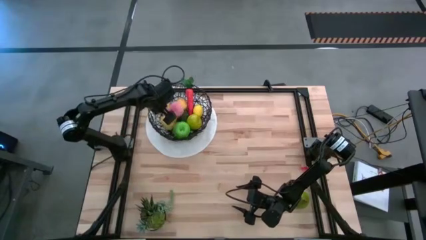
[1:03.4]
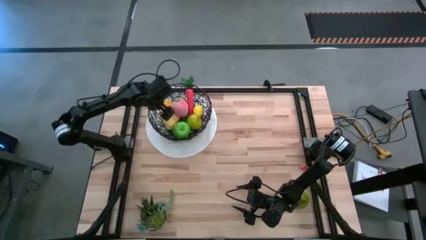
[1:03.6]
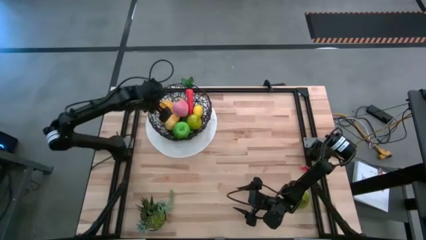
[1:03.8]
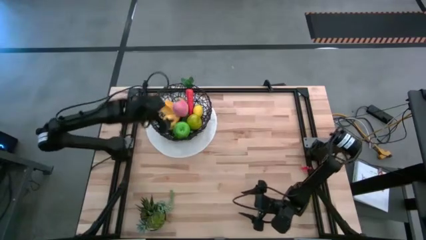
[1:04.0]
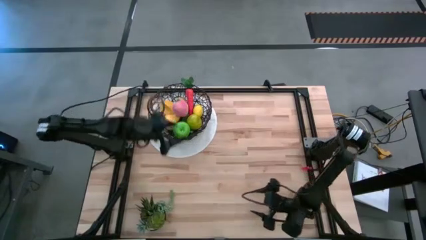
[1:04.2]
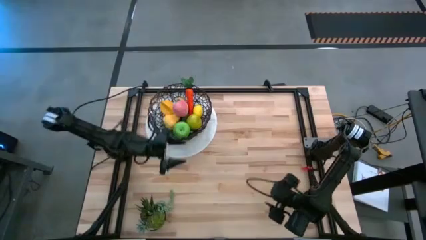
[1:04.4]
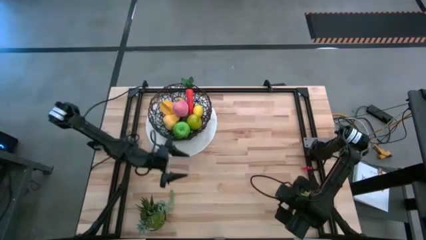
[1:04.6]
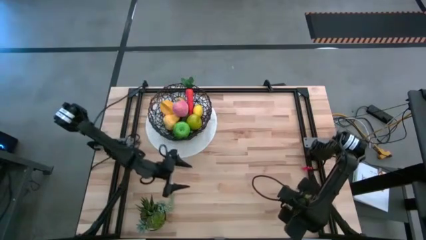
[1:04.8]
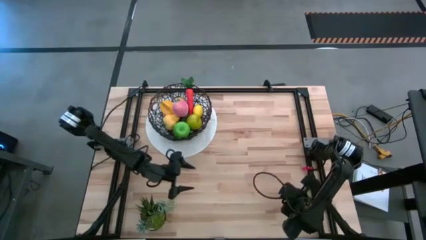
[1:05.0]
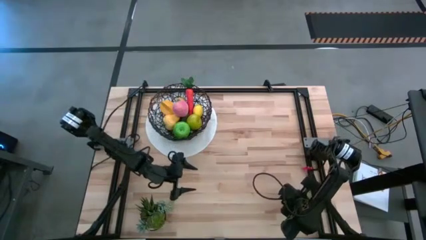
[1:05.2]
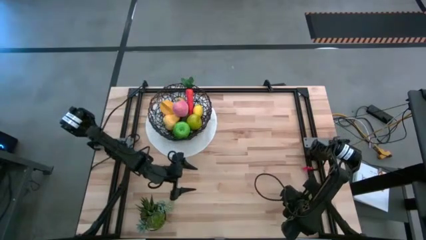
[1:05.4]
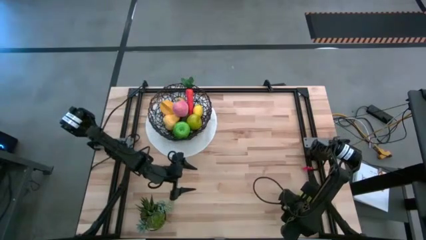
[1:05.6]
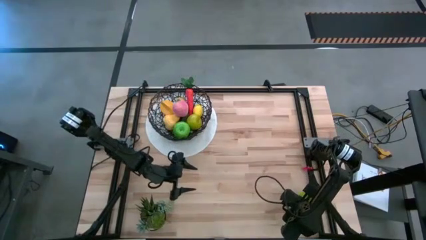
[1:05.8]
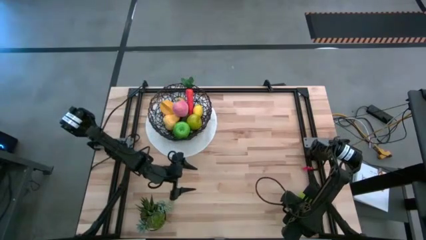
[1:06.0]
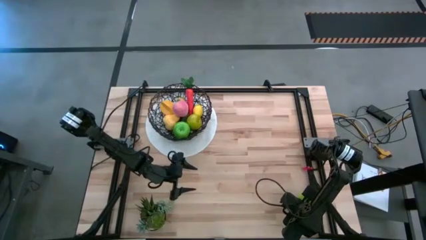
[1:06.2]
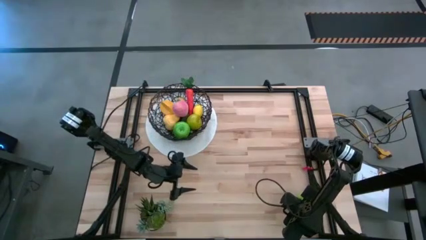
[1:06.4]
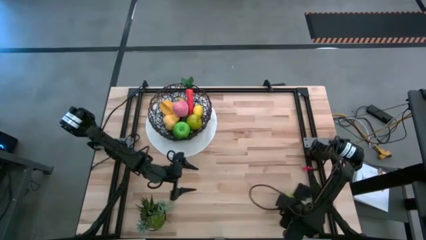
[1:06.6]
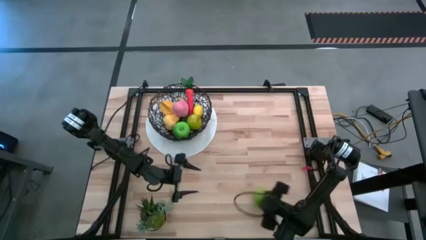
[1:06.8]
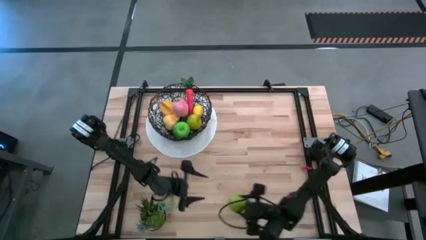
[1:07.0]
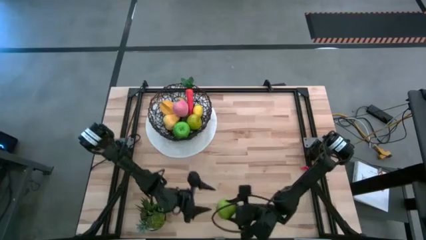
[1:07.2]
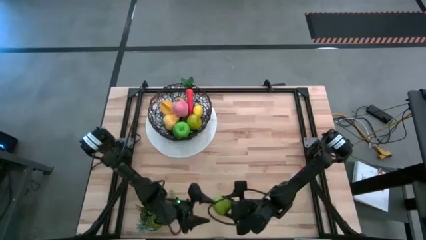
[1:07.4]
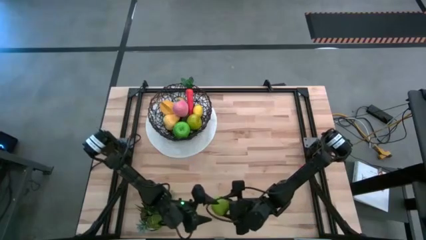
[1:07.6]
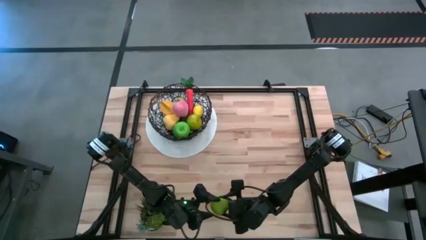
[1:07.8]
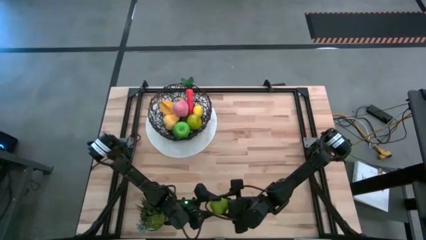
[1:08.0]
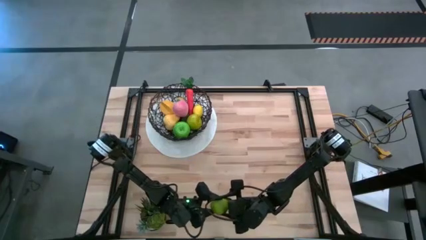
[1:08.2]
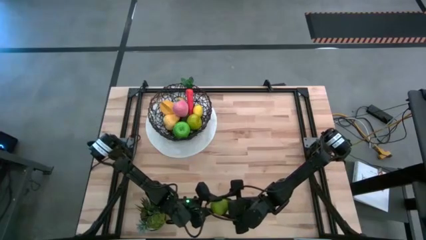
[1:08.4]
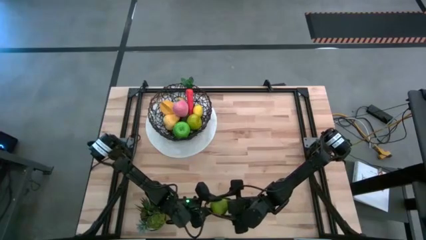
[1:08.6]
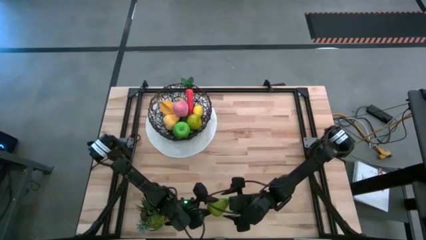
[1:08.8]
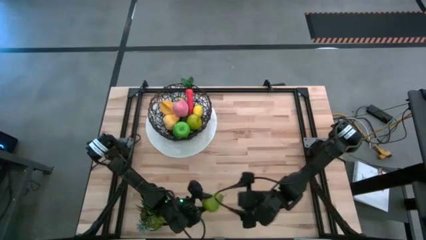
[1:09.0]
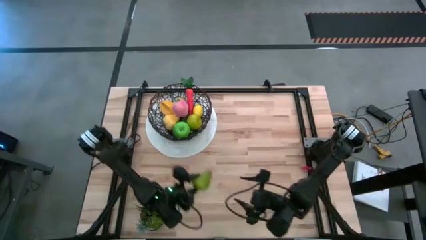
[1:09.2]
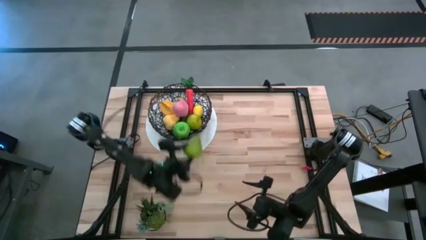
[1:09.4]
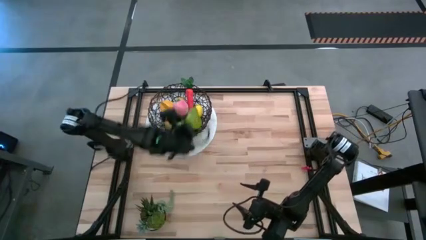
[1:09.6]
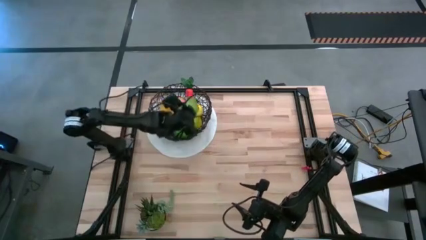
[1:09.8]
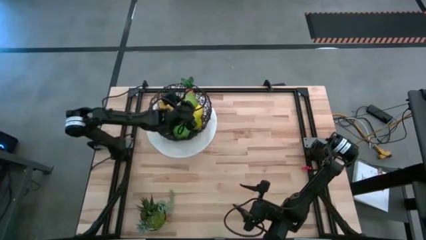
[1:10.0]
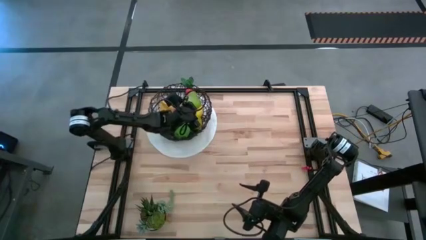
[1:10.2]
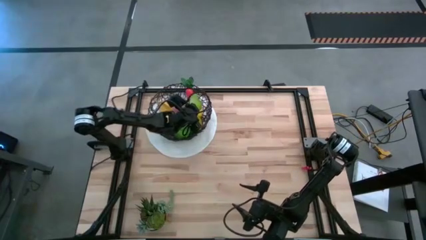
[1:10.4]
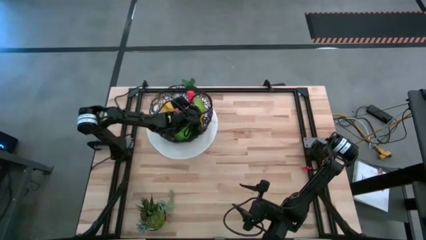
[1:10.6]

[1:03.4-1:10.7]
Task: Build produce basket
Put the green pear into the wire basket

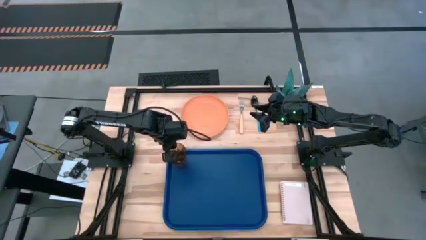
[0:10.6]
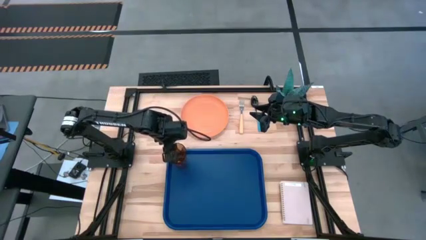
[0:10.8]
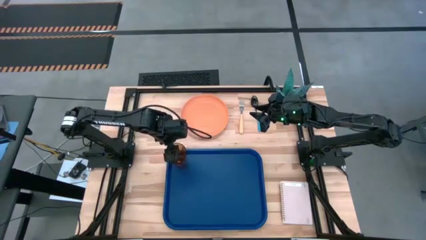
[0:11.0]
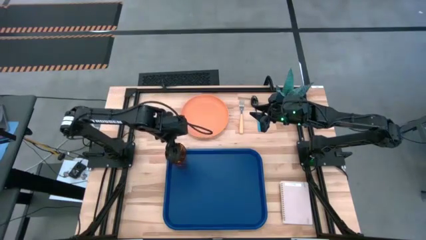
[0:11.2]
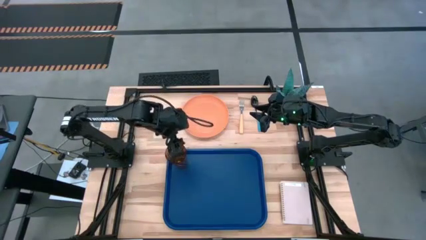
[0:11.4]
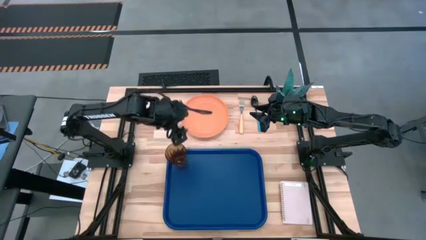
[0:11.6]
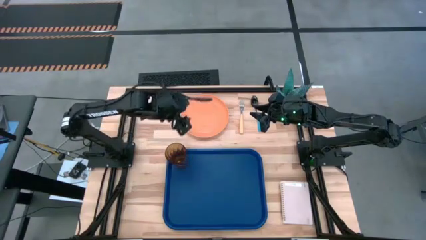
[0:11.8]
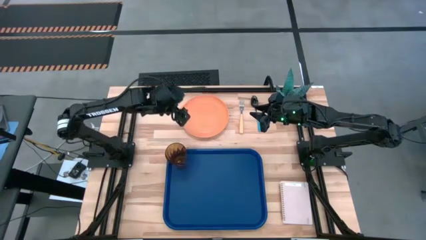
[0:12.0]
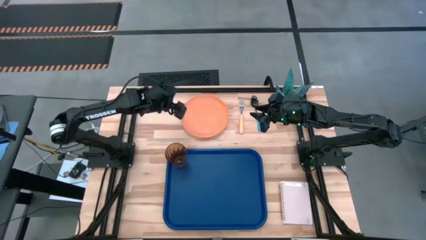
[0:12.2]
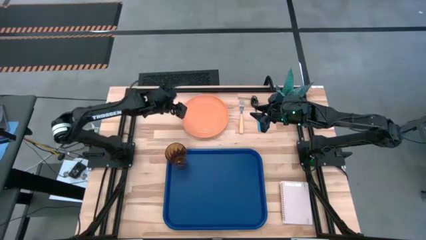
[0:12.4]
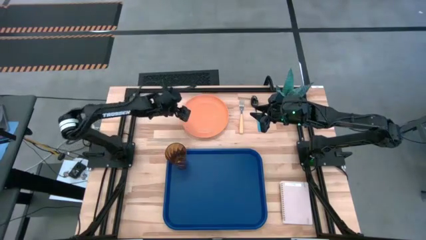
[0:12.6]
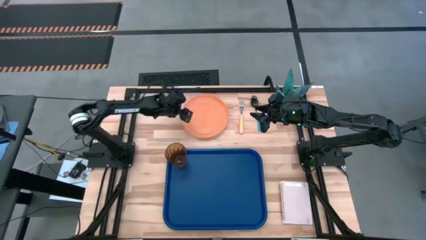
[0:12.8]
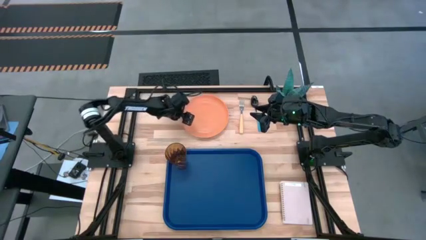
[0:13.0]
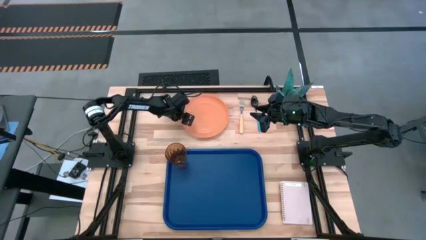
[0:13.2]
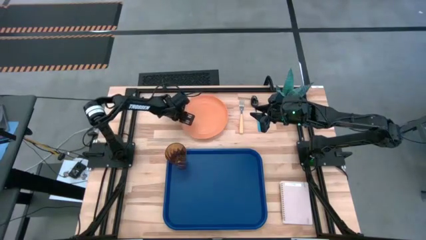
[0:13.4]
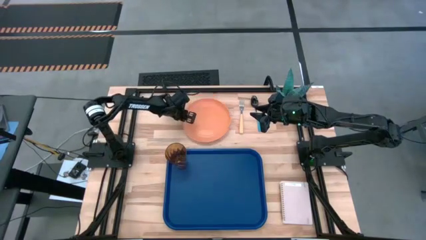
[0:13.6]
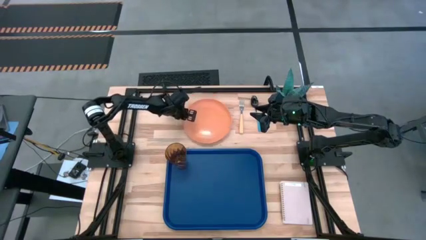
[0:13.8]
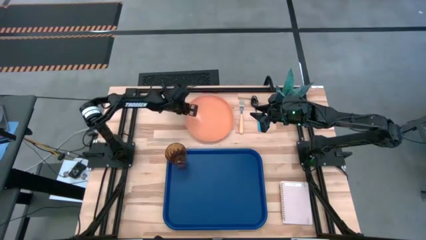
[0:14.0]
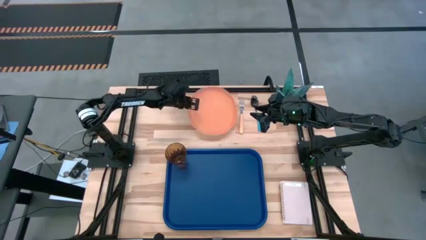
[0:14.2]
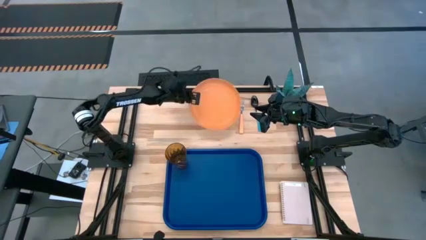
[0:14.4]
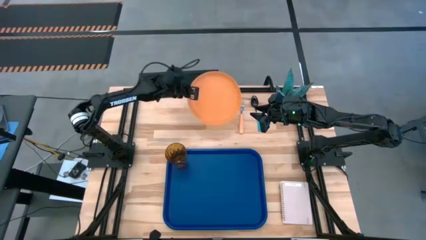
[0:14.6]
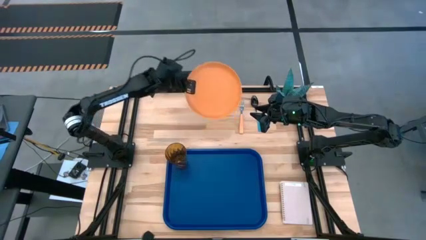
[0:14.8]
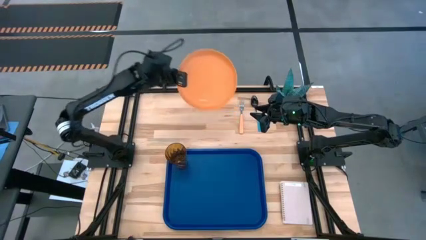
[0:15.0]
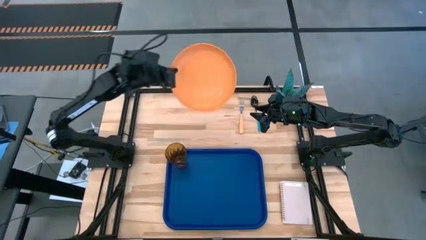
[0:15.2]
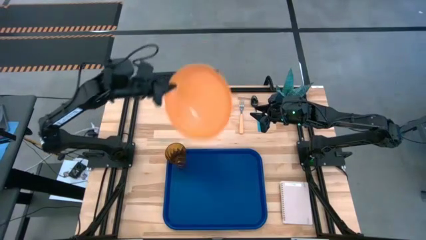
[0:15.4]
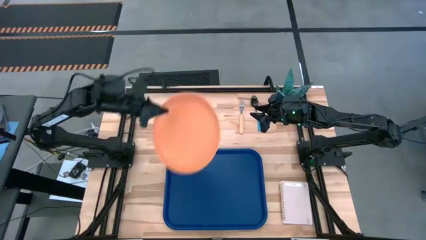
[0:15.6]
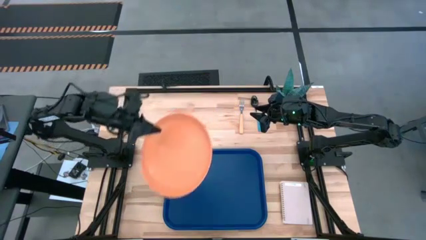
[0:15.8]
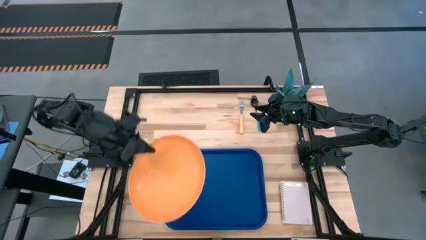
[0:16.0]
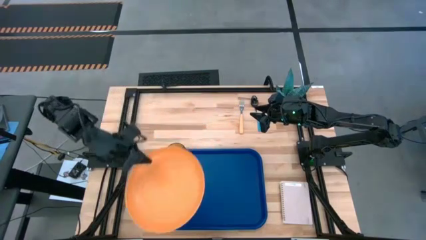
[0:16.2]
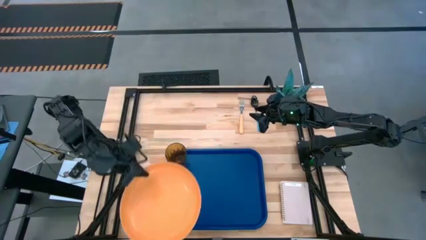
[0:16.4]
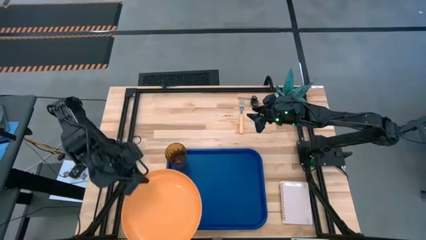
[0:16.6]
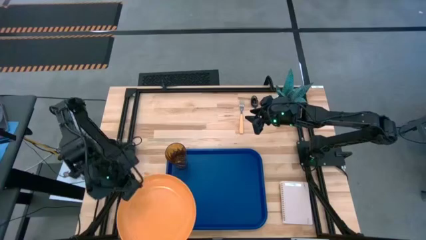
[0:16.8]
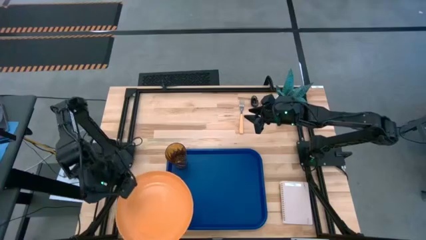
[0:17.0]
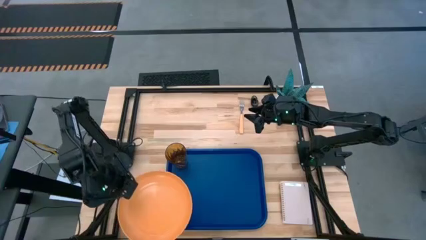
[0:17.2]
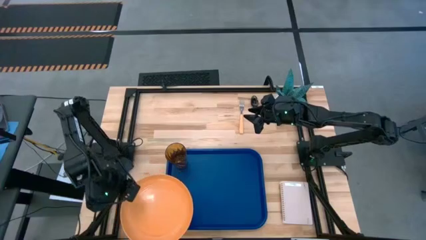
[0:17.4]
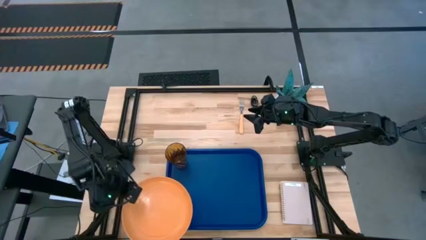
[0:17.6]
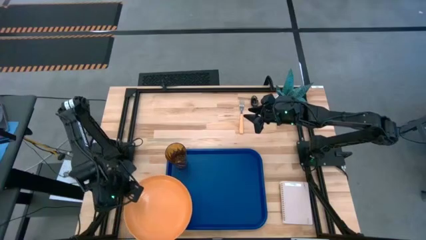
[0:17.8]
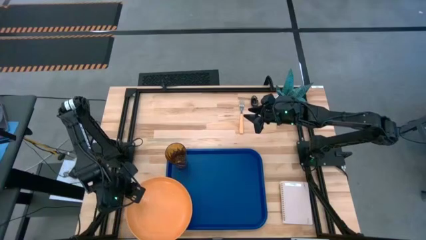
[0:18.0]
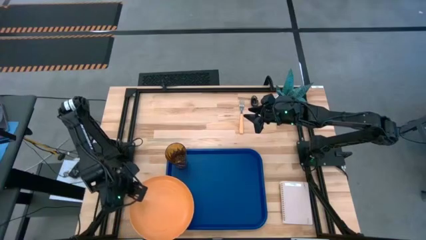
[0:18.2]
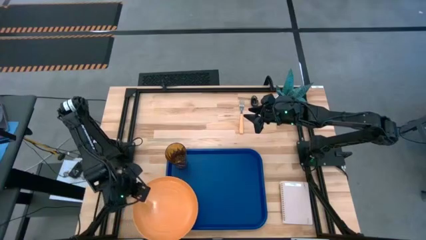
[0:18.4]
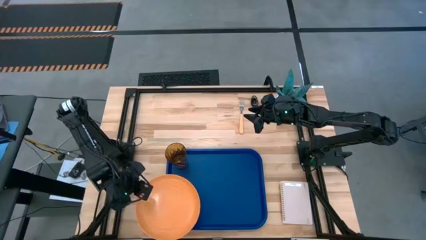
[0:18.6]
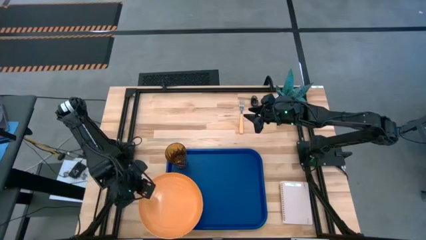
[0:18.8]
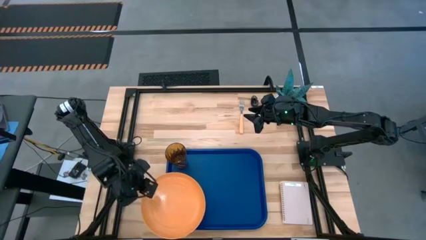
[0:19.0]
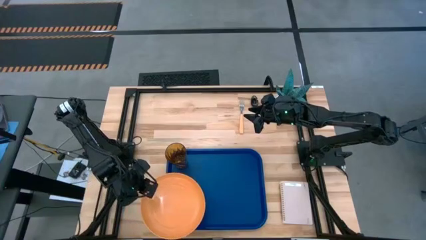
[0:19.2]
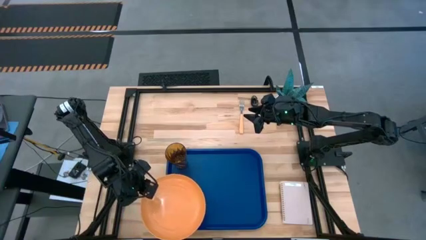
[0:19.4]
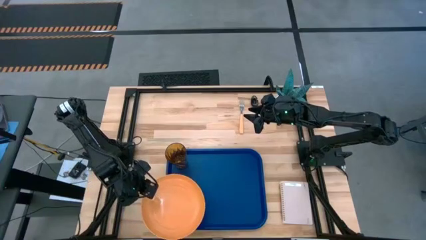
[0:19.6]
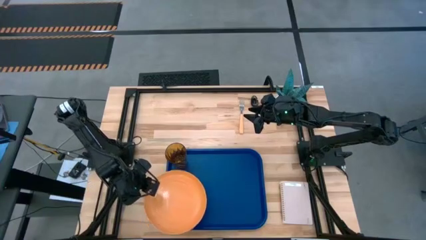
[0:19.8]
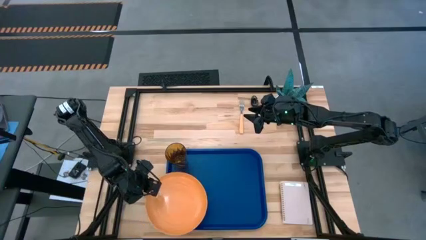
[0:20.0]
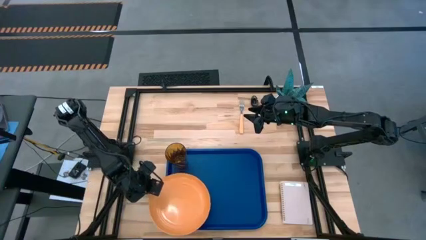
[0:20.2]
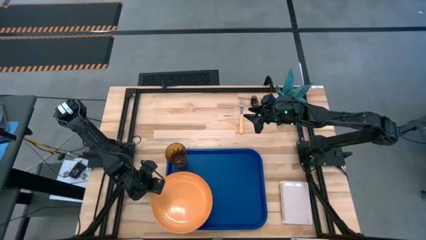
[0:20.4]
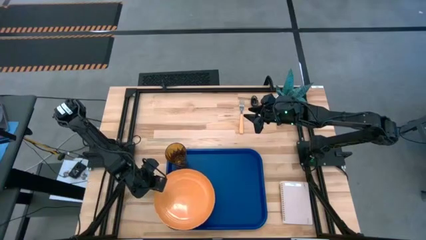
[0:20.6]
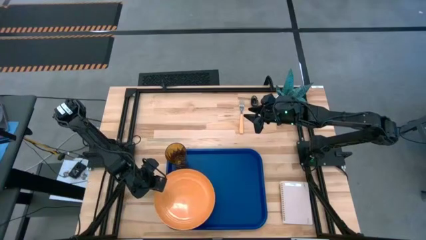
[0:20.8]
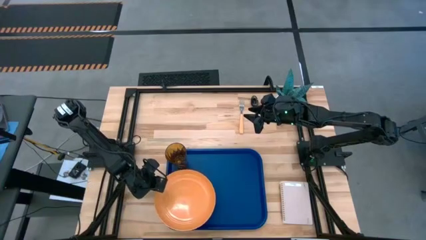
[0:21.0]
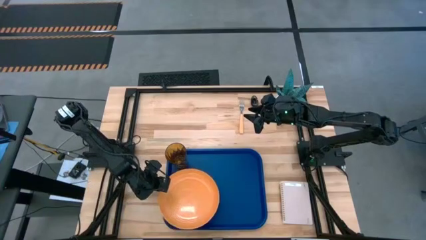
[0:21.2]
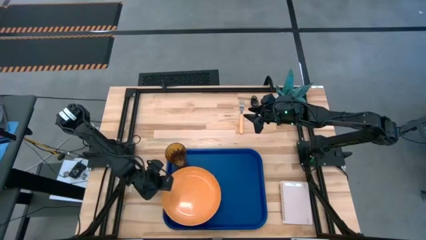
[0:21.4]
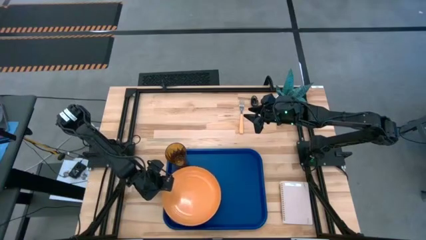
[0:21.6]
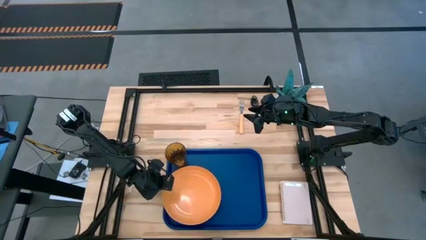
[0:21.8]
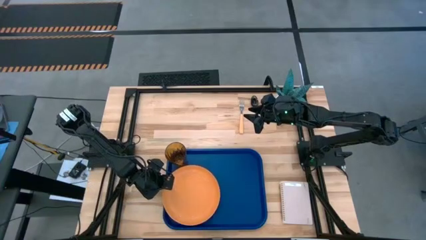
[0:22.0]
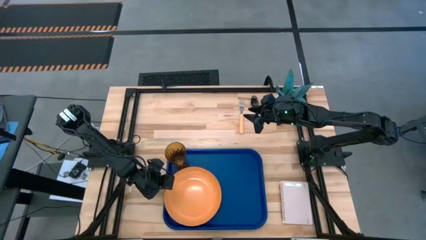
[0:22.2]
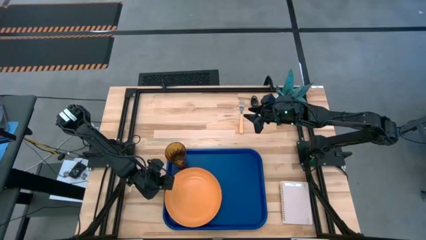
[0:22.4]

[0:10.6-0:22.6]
Task: Pick and place plate/cup/fork/spoon on tray
Put the orange plate on the blue serving tray to the bottom of the yellow cup
